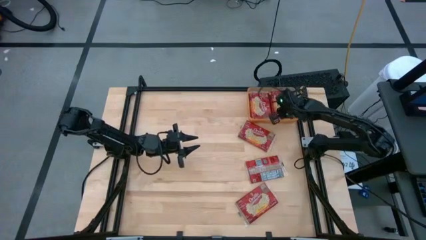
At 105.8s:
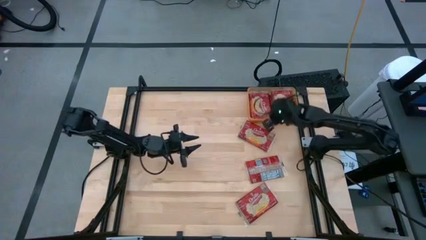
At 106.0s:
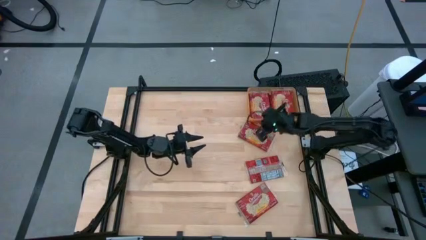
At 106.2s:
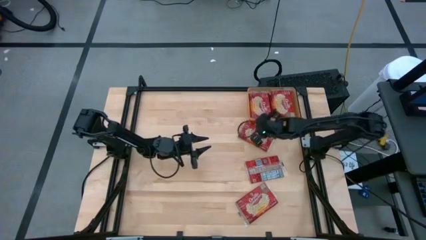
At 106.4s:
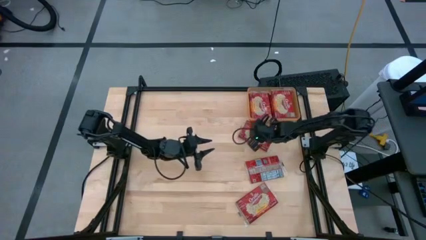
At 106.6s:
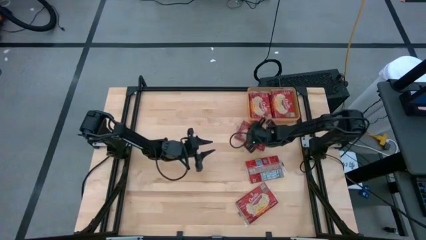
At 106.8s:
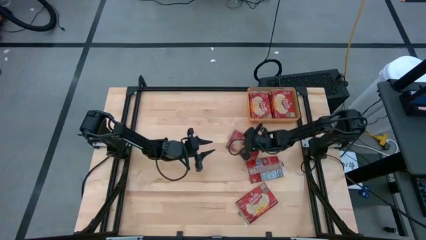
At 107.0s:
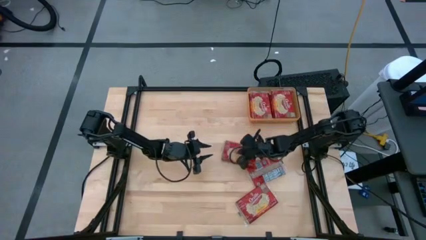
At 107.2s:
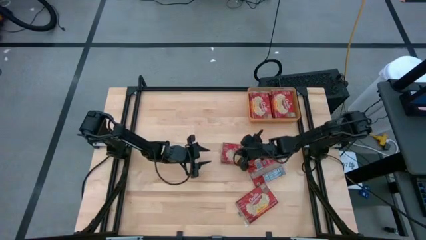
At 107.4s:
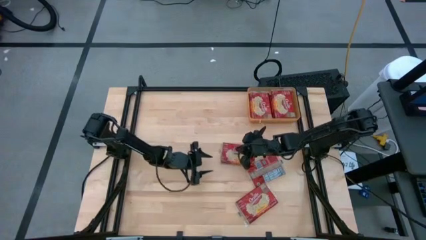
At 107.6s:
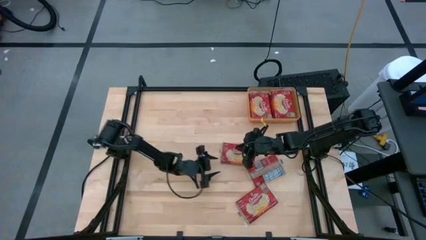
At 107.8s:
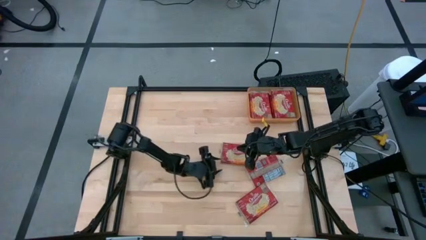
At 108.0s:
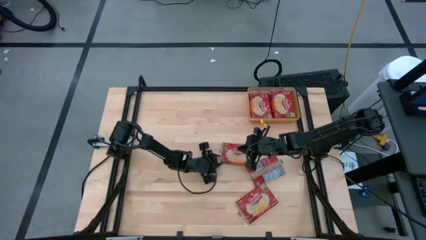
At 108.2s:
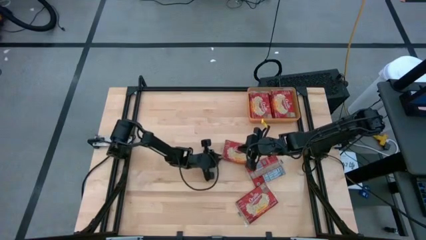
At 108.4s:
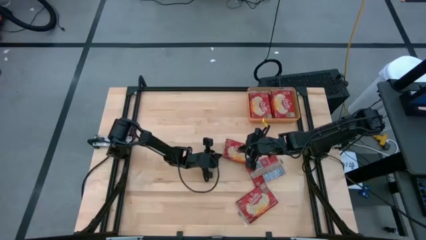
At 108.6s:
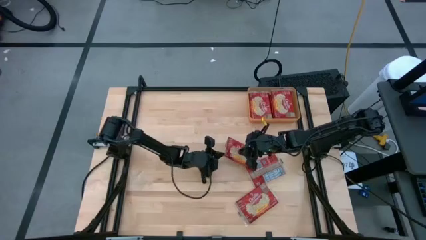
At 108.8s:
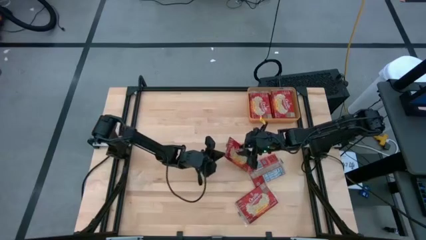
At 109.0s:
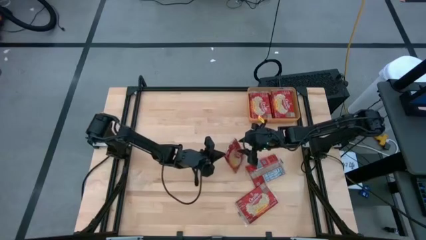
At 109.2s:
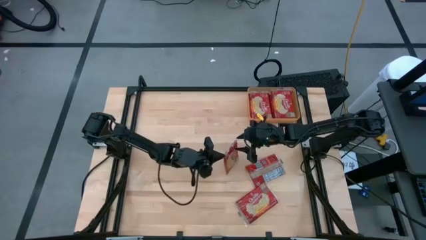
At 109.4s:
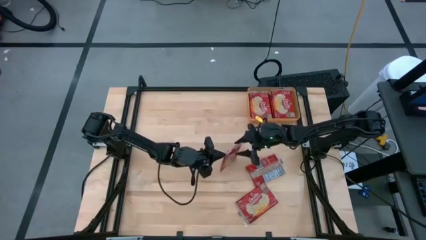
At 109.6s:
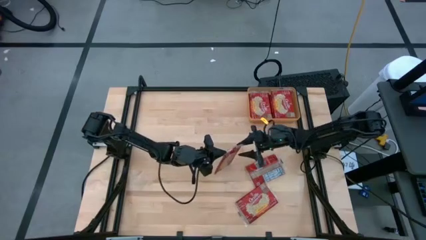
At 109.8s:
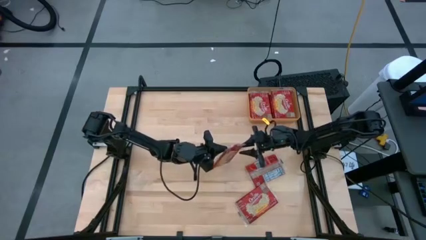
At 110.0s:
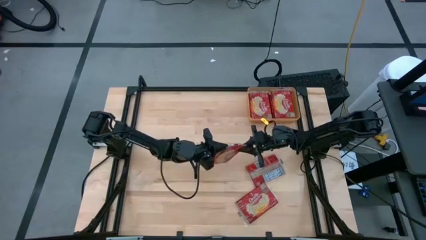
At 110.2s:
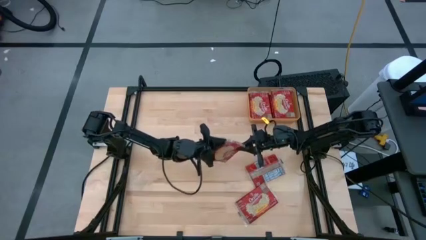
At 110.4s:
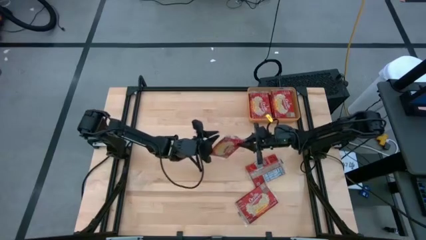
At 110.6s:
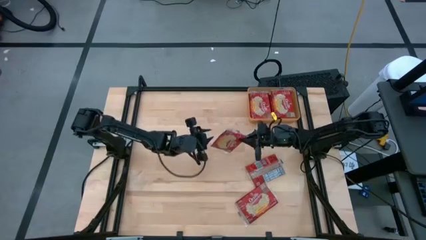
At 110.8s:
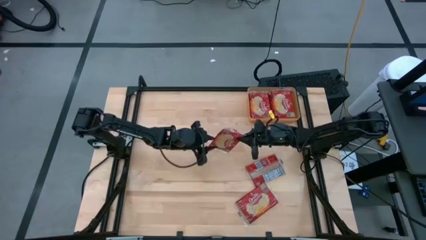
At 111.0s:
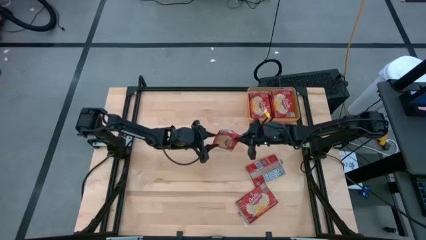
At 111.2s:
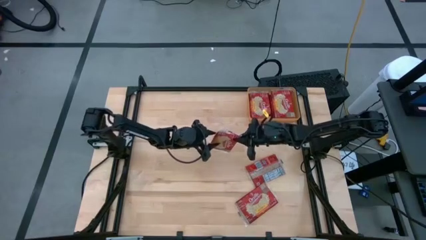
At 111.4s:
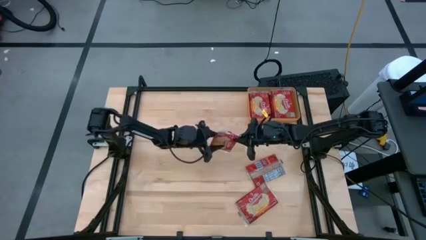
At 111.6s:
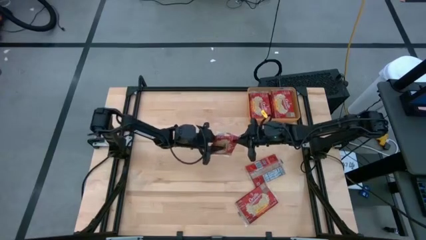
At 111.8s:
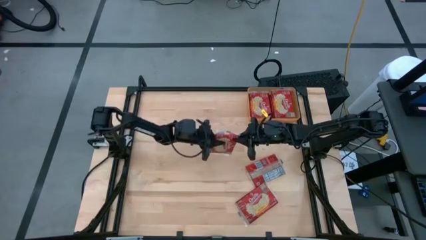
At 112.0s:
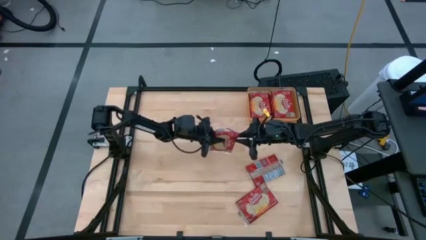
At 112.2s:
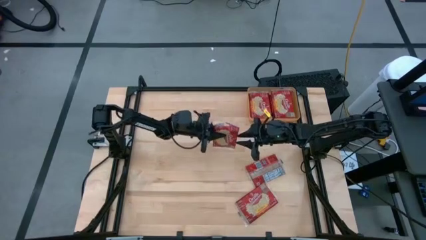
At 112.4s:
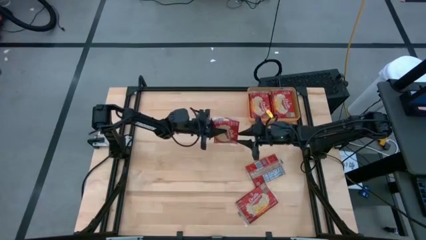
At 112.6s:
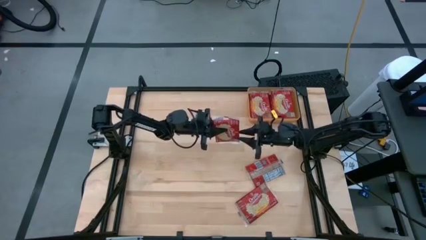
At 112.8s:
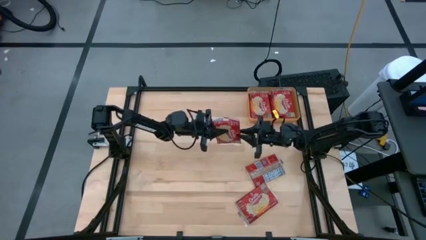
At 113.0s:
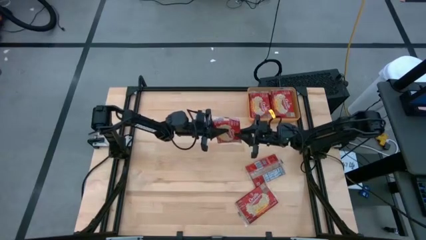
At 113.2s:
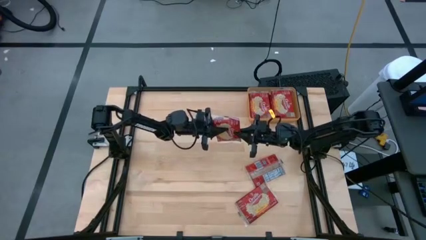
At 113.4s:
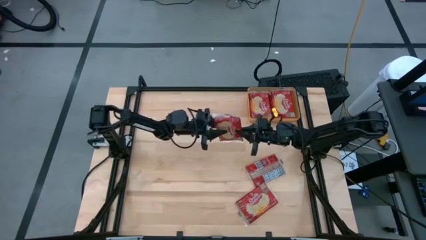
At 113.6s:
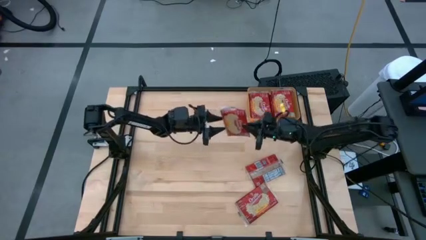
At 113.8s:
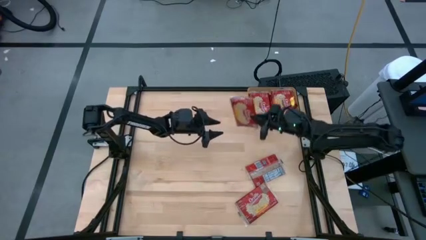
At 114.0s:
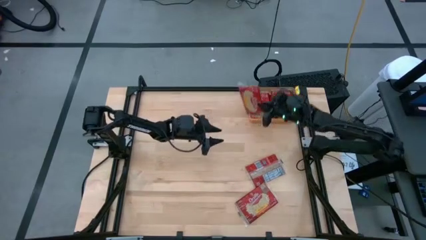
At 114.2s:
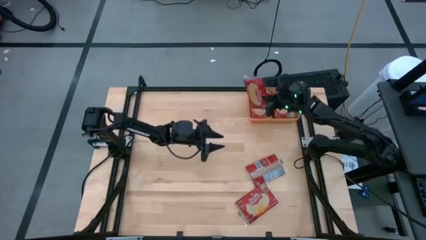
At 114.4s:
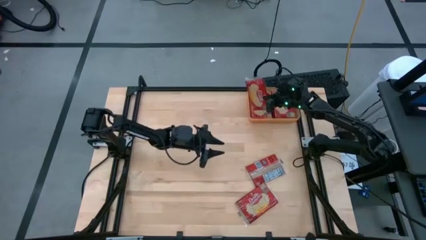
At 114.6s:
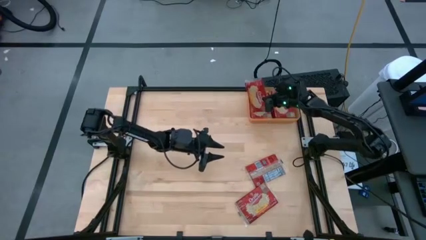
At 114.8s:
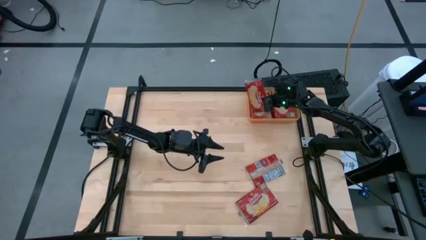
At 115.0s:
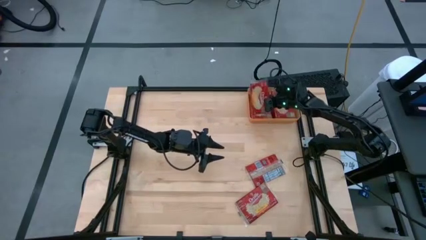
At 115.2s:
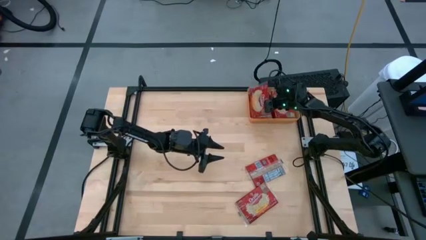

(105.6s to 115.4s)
Task: Sort popcorn bags into baskets
Put the red popcorn bag into the orange bin

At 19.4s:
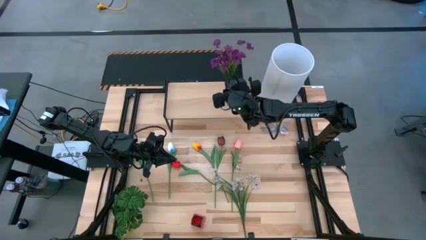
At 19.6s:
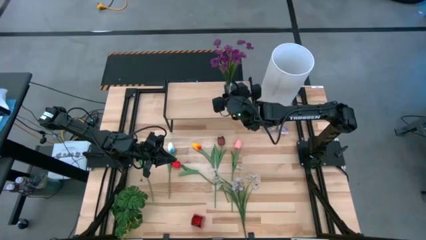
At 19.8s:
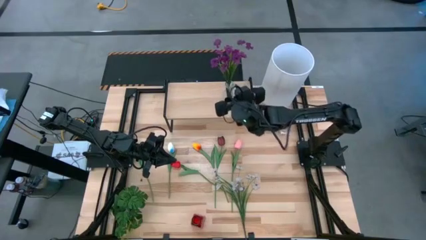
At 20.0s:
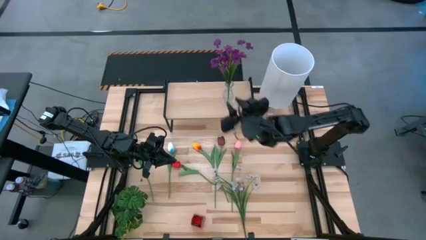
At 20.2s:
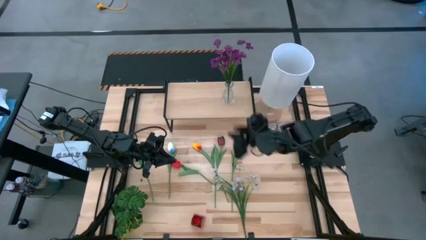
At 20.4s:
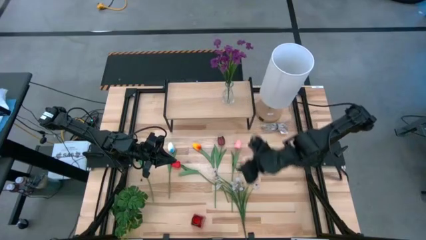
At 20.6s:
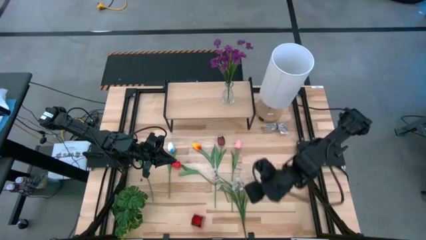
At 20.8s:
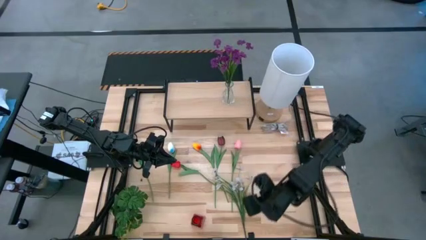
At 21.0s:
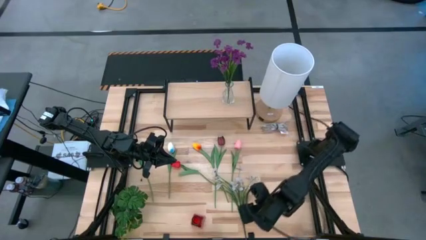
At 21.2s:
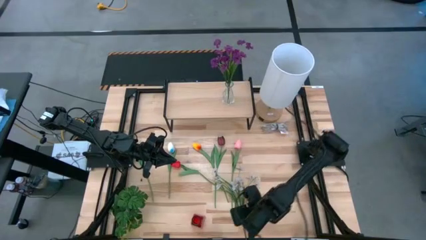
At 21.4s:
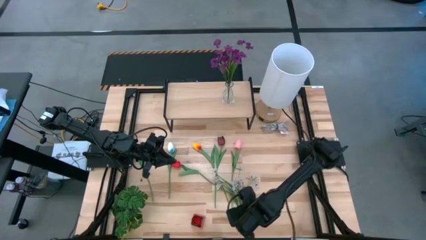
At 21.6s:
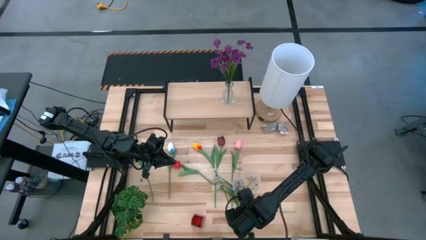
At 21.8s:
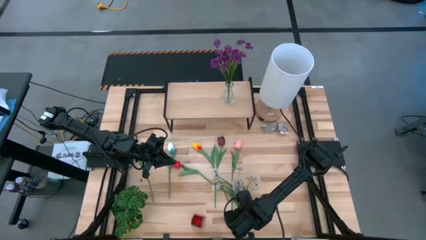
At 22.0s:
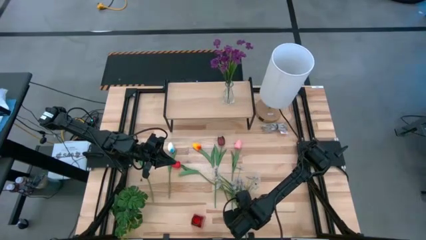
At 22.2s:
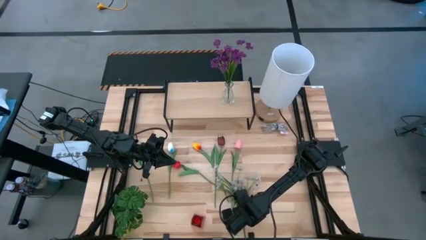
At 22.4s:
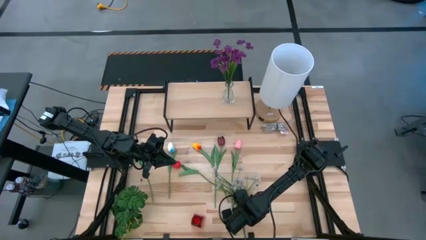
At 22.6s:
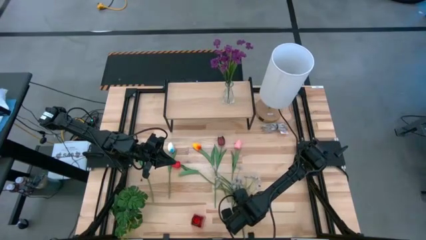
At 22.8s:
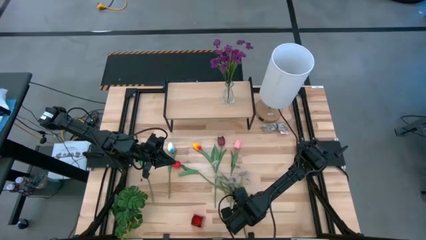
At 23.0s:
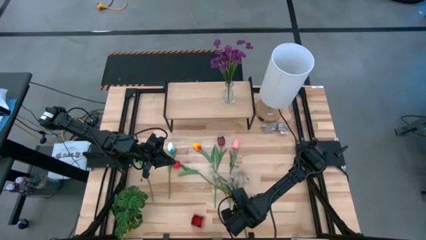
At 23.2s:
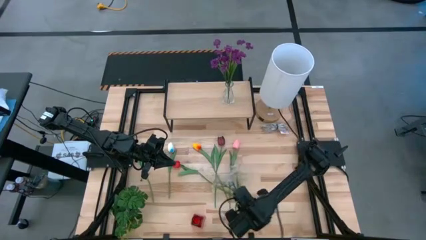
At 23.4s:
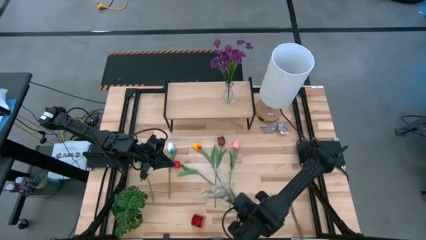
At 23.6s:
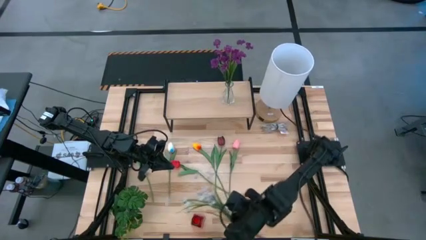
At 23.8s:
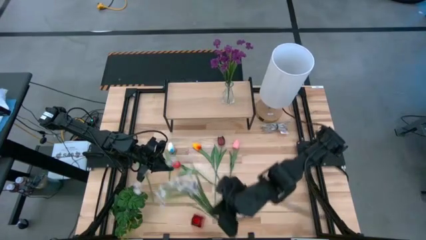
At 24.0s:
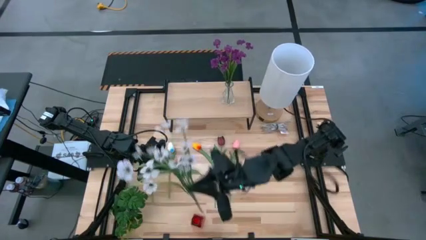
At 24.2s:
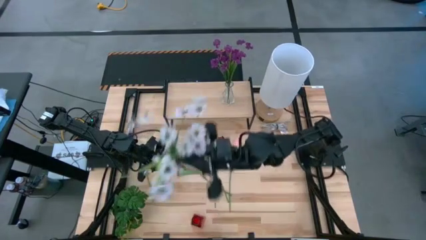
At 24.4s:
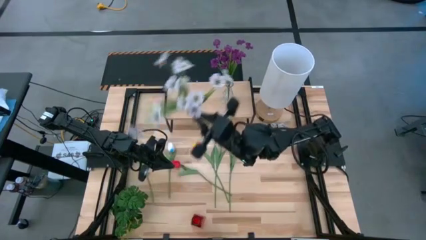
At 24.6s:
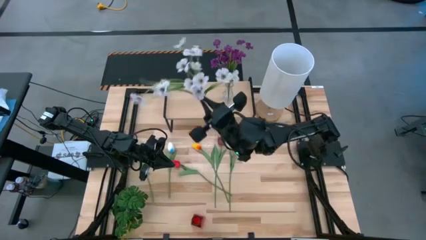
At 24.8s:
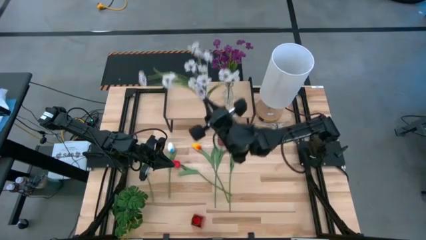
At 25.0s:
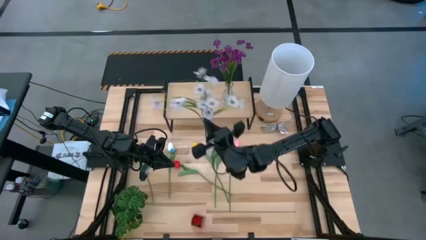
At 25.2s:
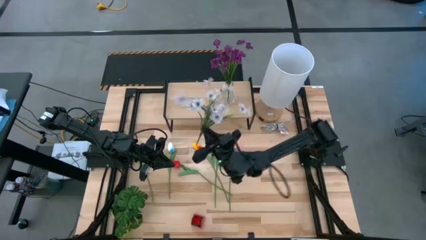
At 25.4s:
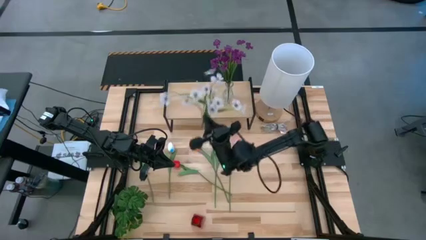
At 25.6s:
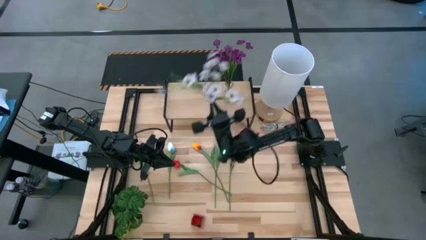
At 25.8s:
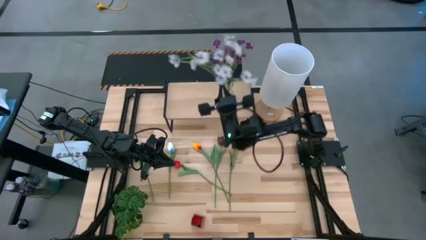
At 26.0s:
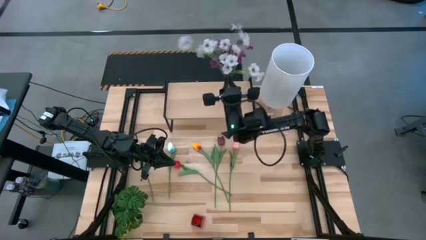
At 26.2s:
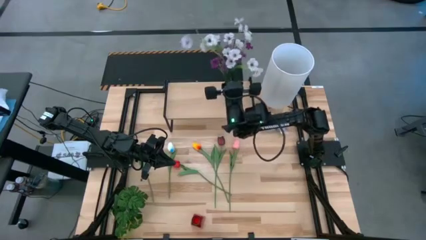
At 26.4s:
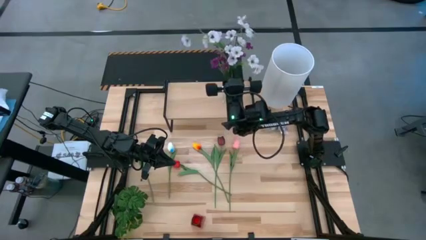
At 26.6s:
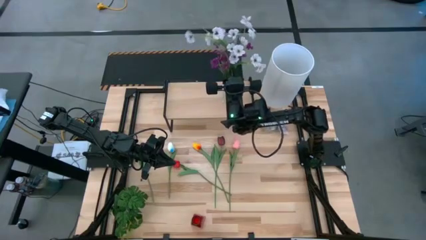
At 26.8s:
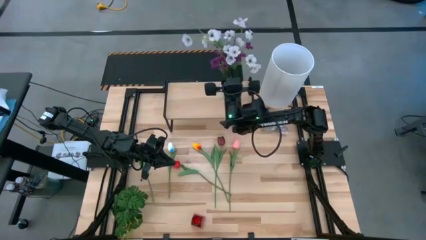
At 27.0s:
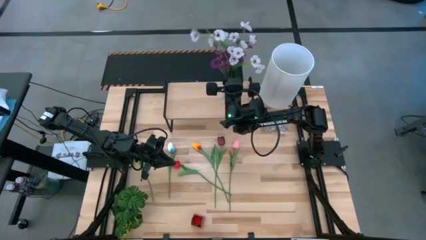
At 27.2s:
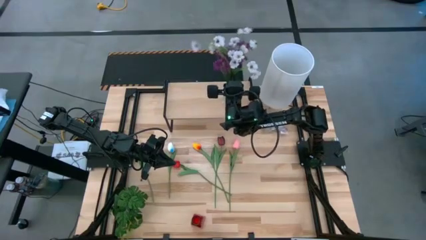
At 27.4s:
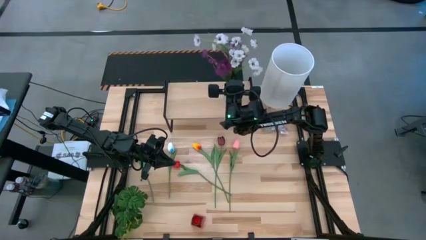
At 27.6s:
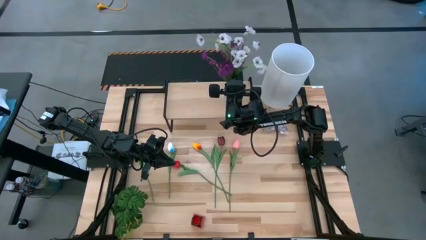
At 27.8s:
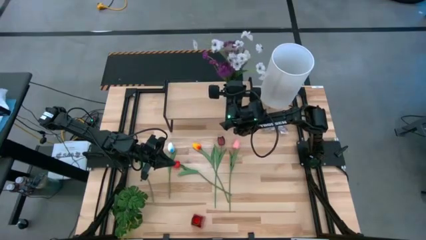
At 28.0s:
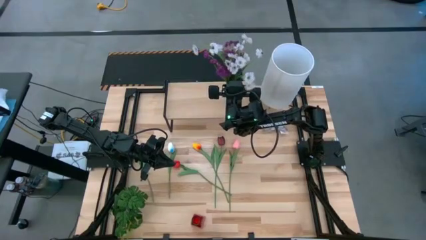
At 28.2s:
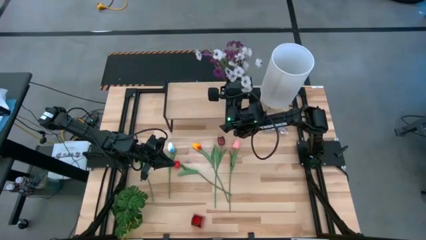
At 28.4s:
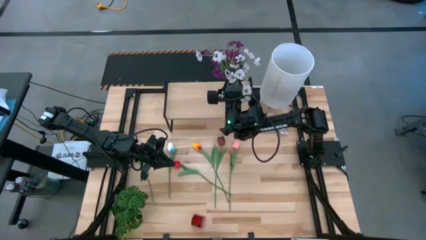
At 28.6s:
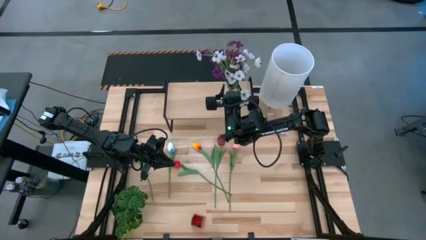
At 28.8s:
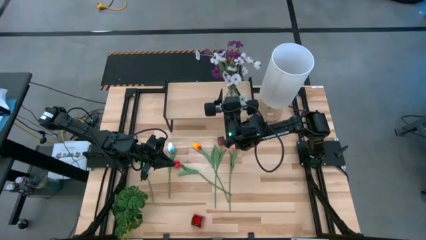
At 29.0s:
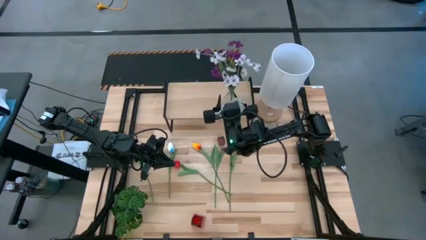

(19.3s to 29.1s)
Task: Pick and place flowers into a vace then onto a shelf
Put the white flowers into the transparent vase on the shelf
